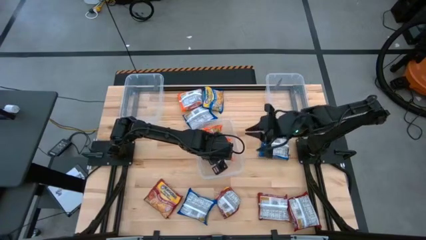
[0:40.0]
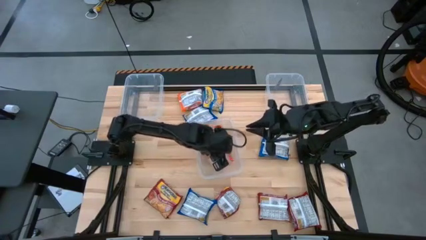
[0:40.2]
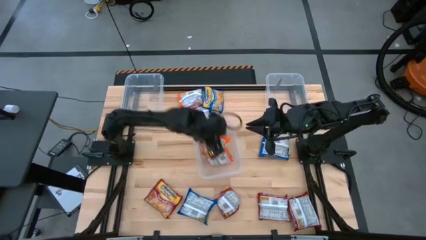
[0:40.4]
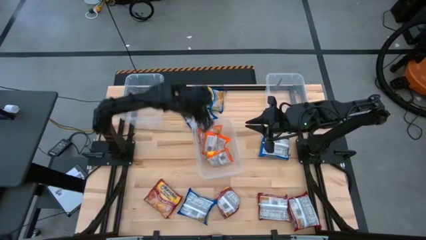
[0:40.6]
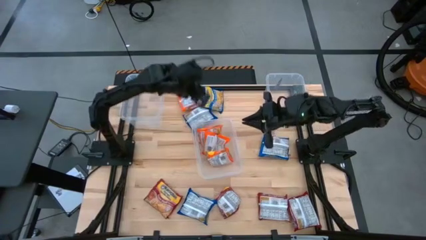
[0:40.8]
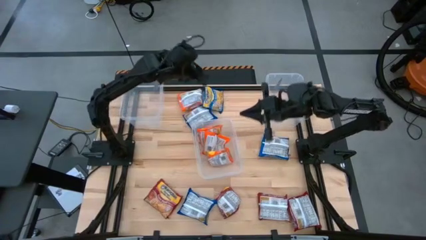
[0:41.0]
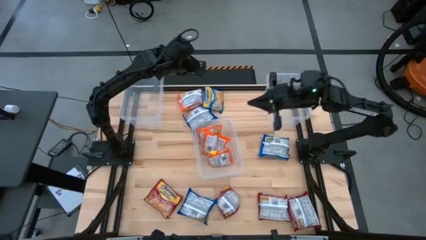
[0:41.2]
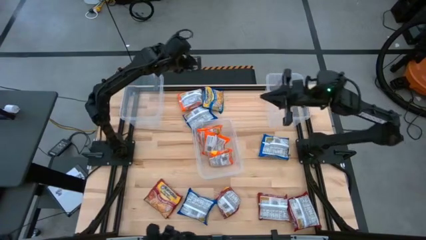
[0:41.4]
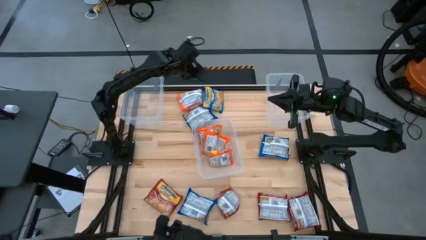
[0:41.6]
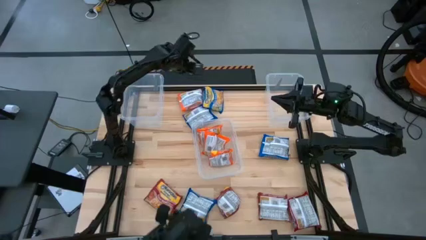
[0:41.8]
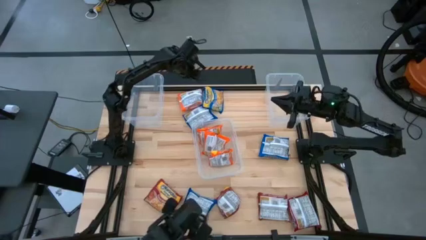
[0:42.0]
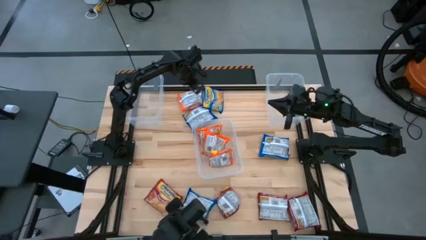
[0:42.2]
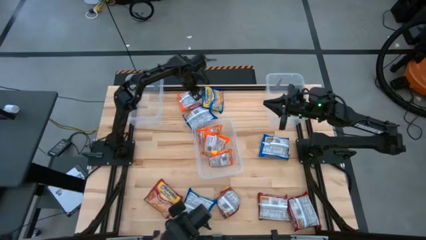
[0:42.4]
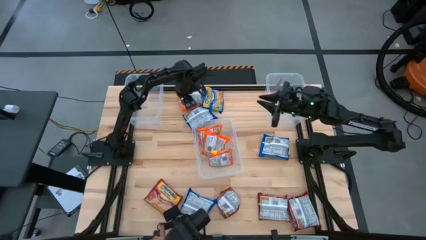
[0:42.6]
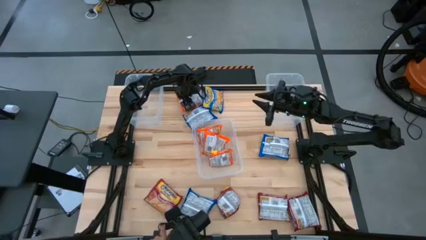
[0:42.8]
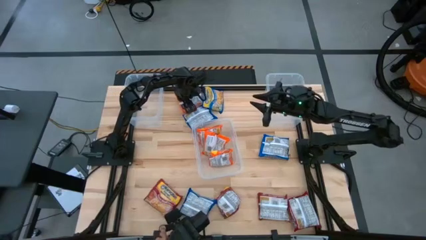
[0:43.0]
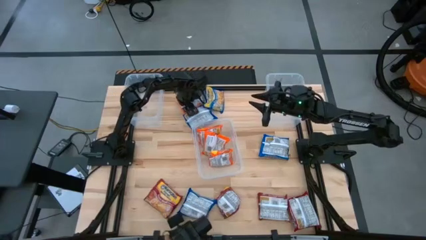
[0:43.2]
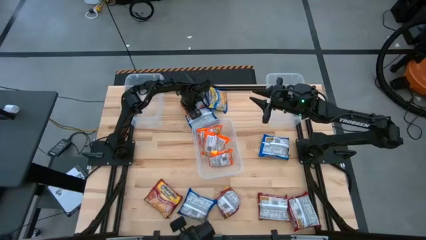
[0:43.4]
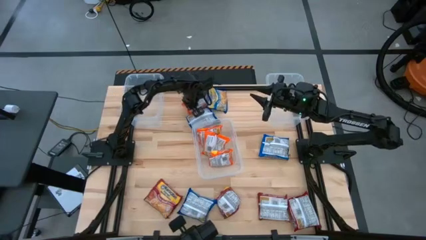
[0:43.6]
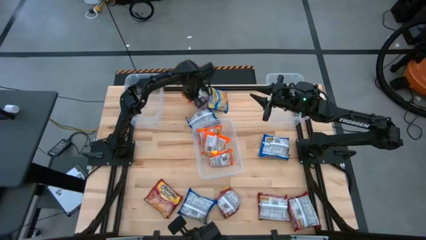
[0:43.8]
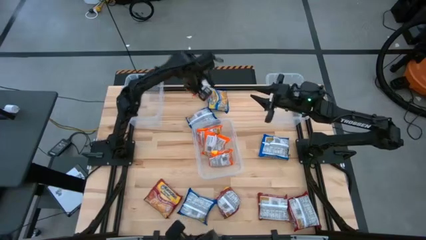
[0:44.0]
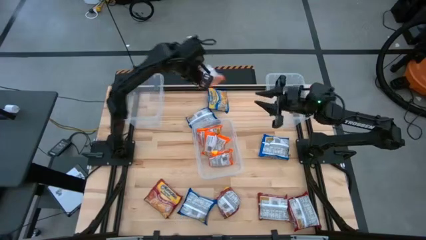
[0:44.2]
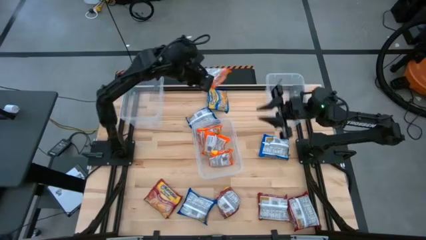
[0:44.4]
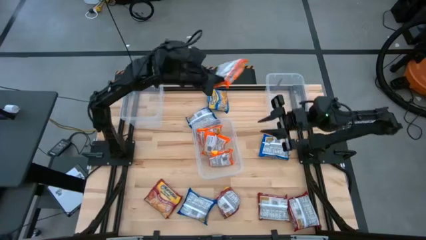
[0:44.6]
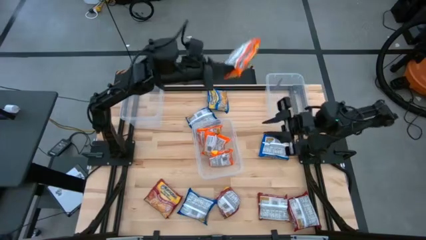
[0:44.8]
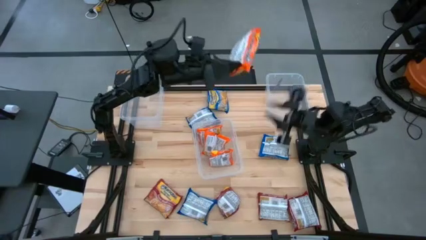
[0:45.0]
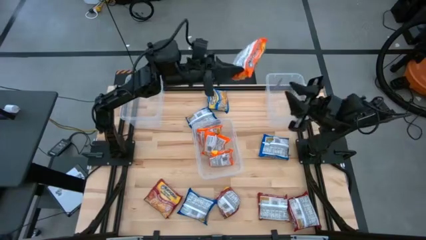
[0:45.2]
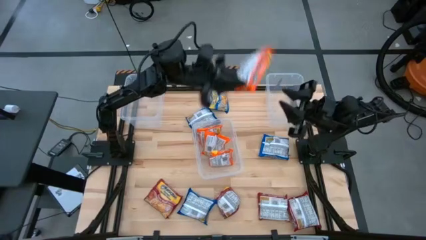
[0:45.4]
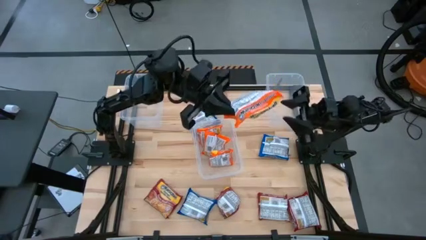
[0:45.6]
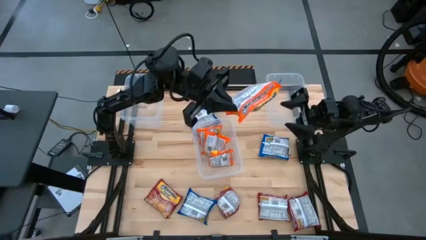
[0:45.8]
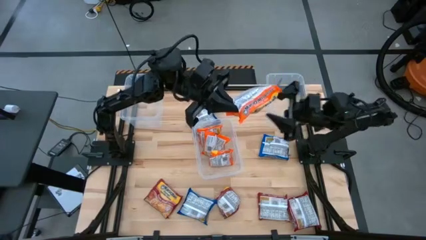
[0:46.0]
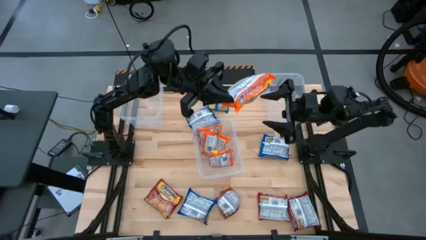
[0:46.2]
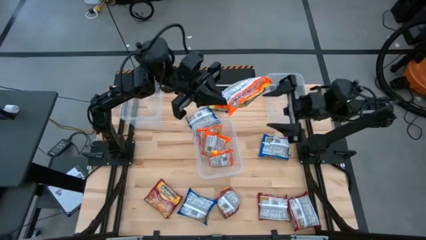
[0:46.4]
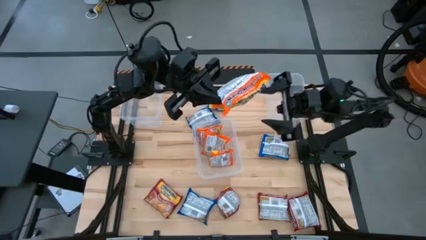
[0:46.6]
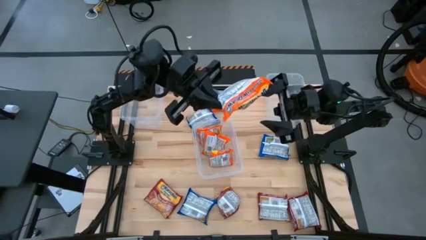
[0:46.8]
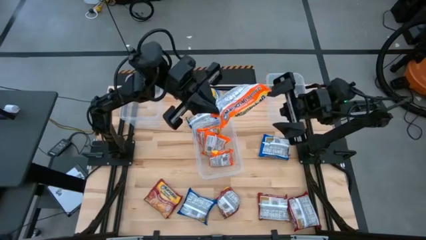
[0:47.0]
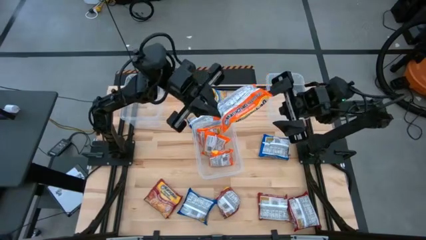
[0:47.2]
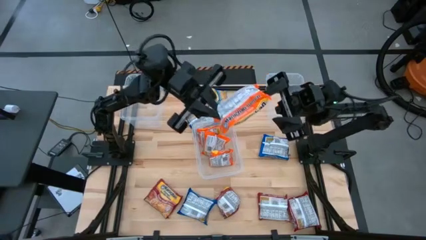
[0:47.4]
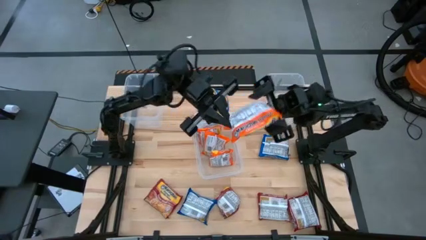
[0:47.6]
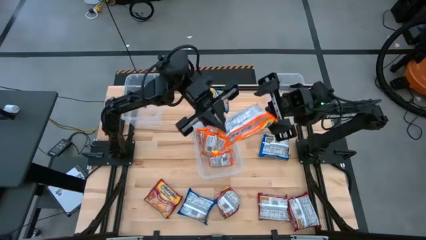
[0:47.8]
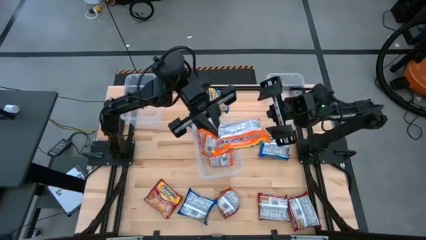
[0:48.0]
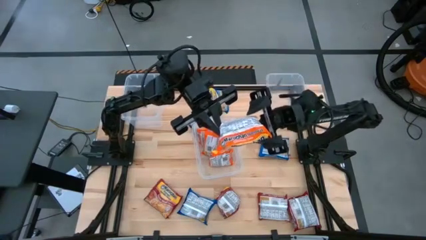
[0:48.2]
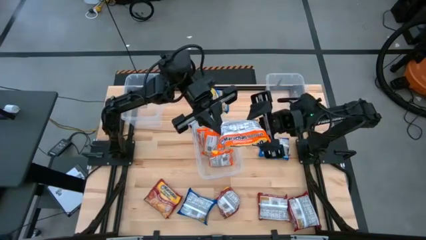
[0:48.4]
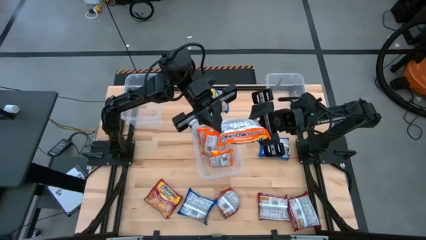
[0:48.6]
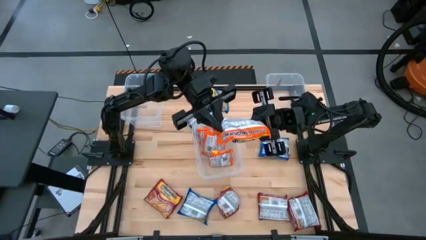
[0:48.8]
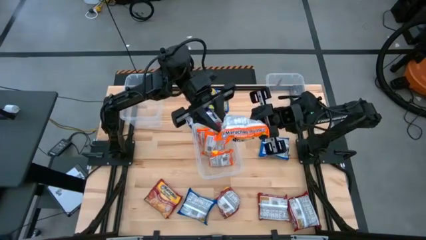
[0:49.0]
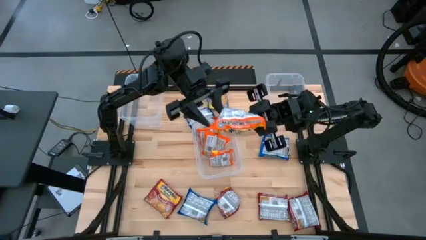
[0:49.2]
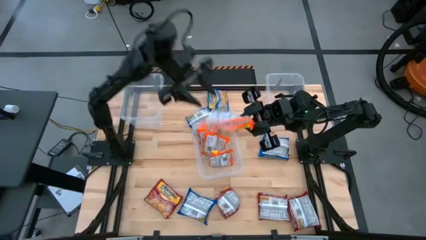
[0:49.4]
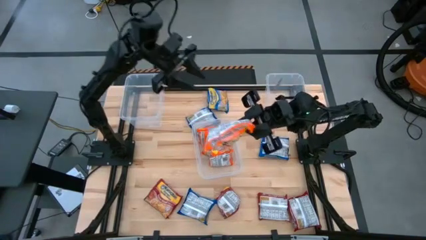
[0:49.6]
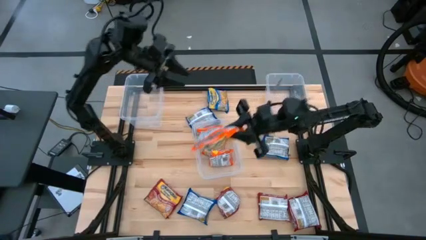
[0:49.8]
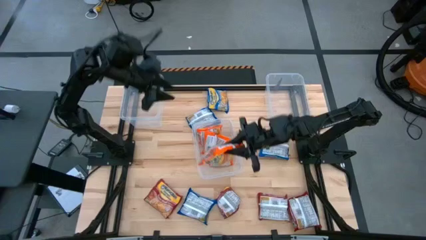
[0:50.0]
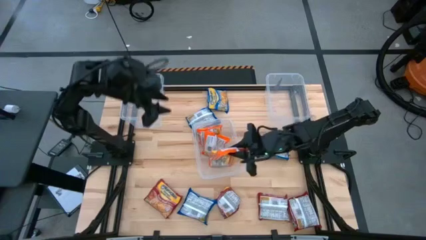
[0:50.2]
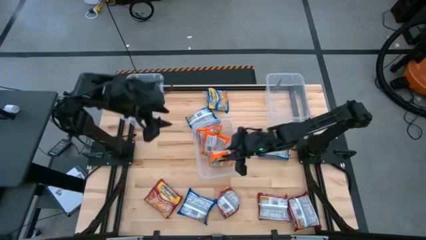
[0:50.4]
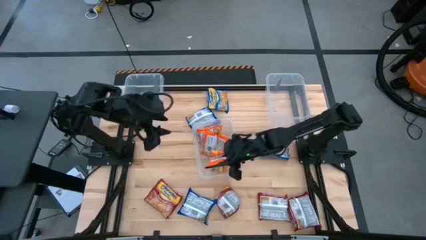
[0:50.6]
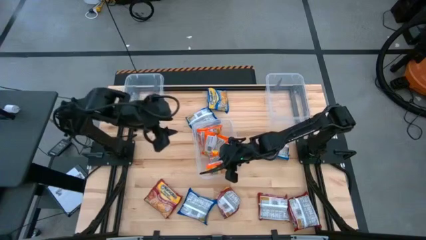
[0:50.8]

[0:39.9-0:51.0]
Task: Sort Maruchan noodles
Put the orange noodle pack into the middle transparent bin
